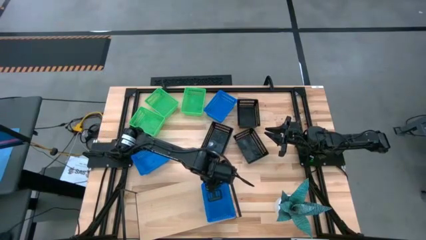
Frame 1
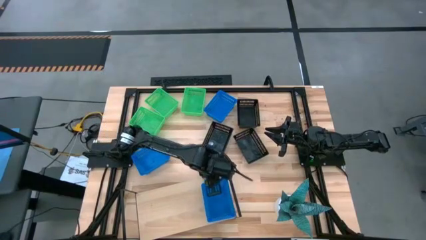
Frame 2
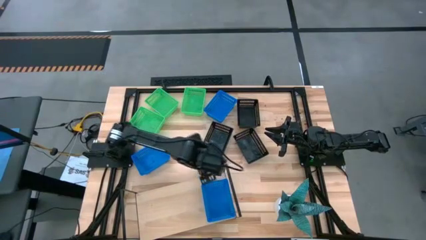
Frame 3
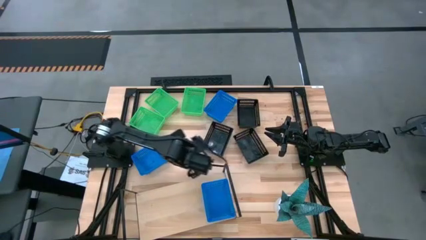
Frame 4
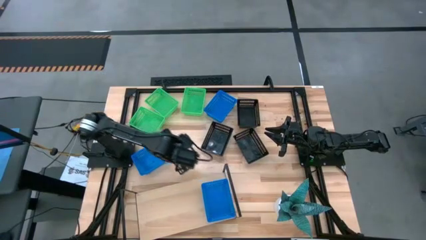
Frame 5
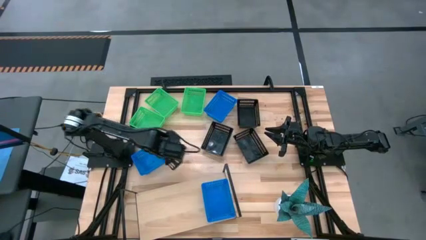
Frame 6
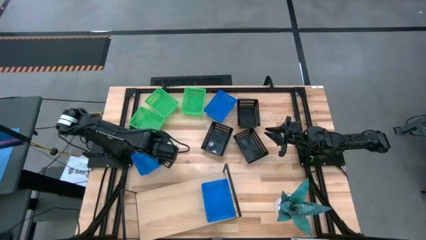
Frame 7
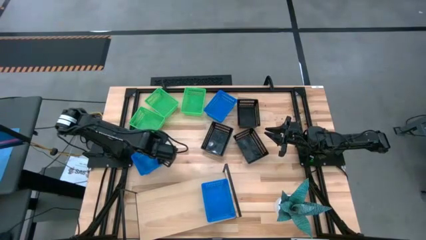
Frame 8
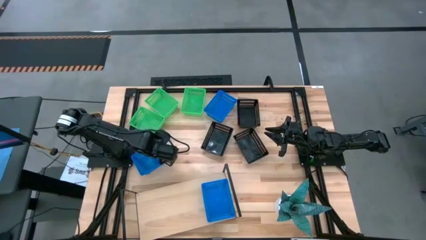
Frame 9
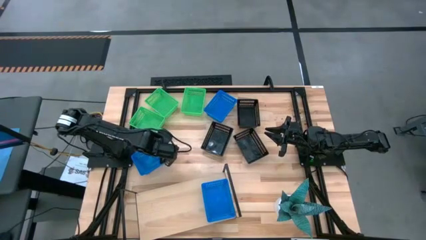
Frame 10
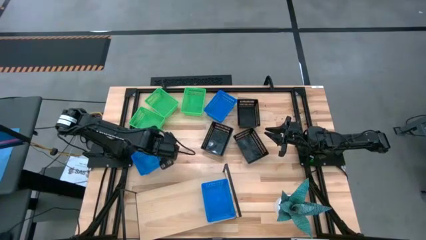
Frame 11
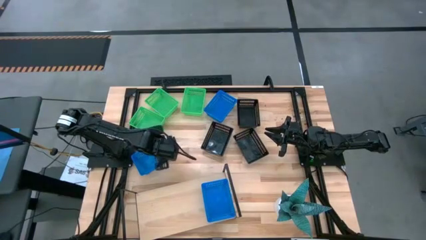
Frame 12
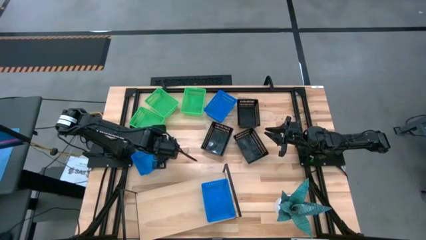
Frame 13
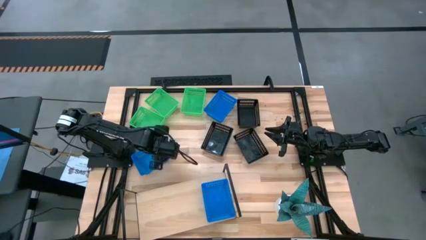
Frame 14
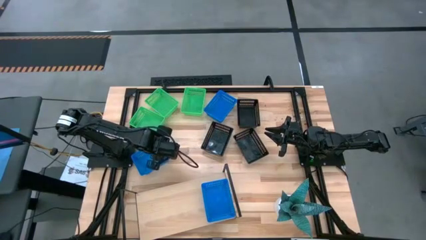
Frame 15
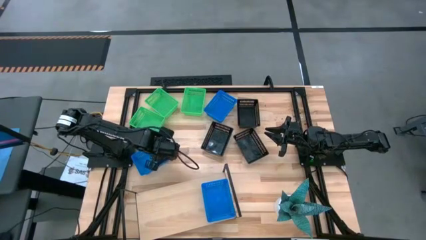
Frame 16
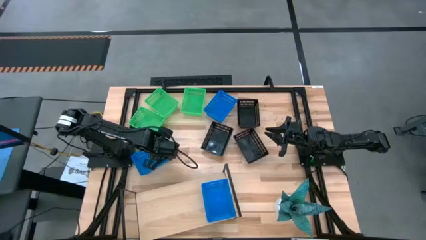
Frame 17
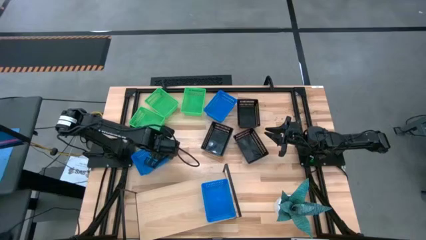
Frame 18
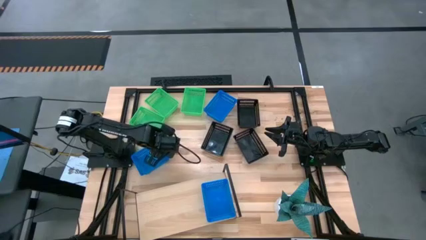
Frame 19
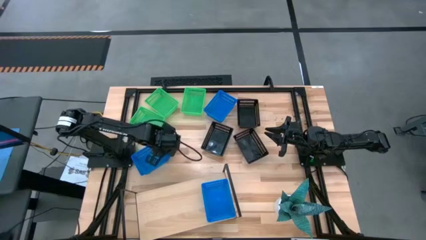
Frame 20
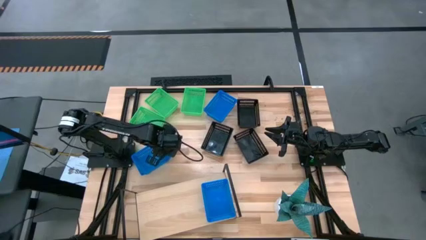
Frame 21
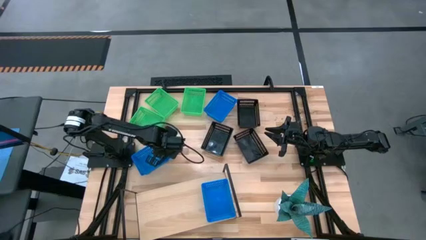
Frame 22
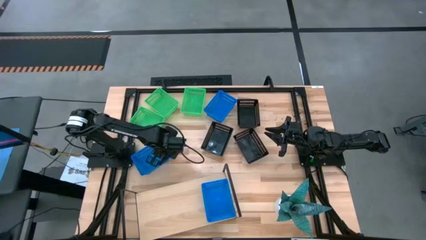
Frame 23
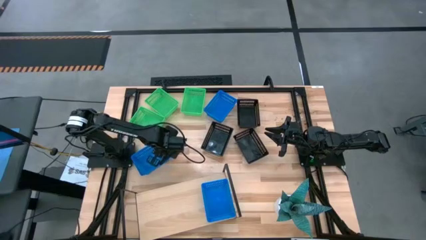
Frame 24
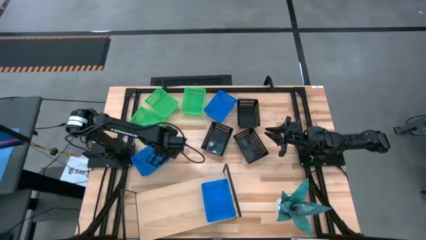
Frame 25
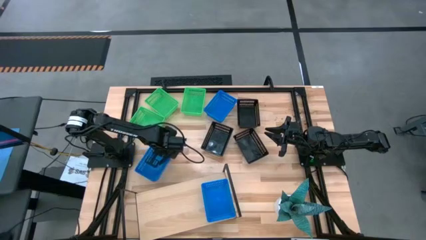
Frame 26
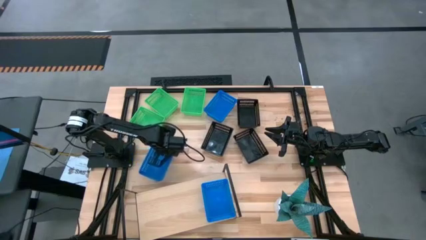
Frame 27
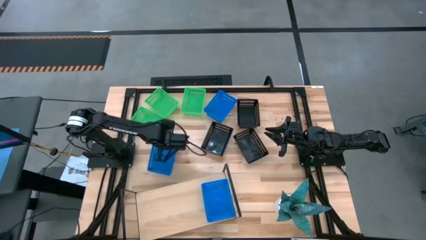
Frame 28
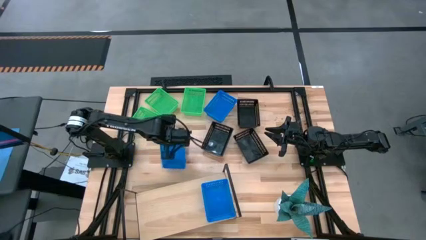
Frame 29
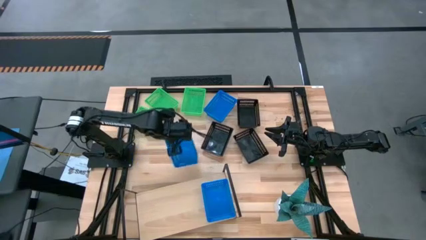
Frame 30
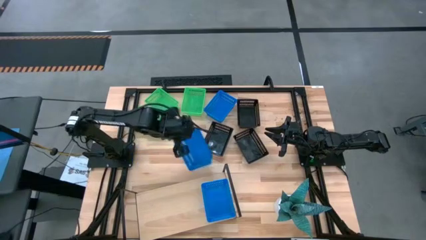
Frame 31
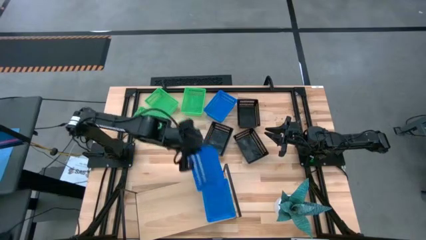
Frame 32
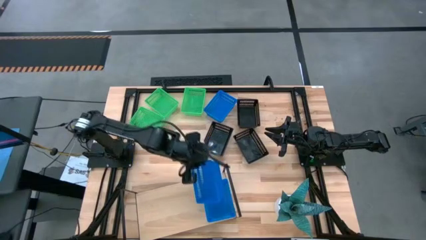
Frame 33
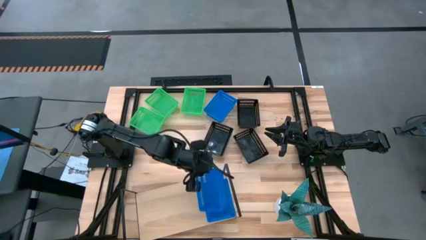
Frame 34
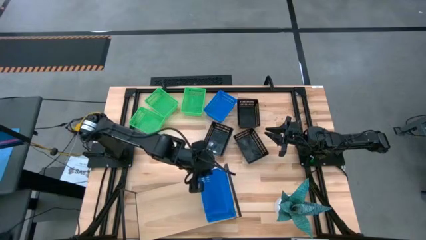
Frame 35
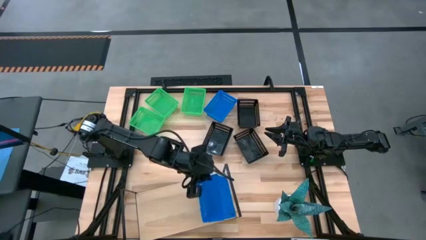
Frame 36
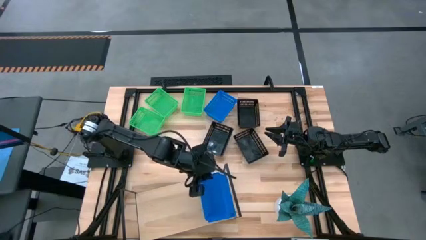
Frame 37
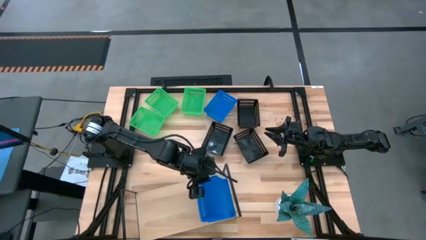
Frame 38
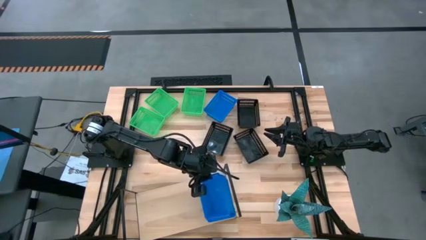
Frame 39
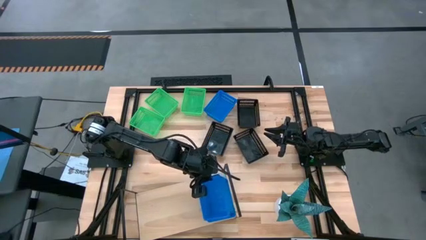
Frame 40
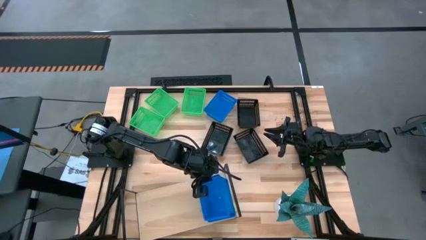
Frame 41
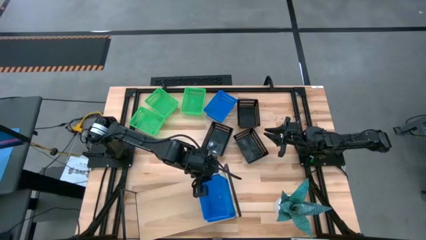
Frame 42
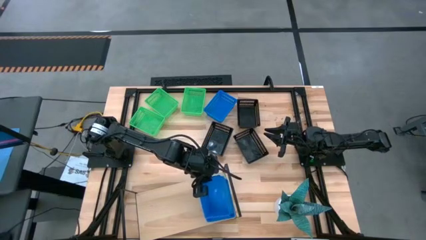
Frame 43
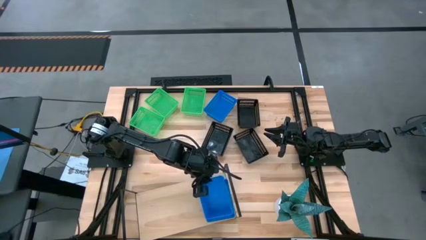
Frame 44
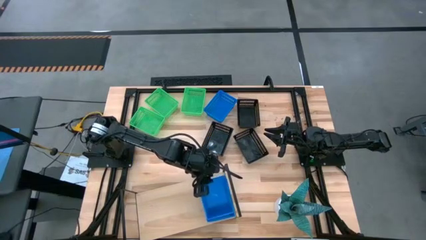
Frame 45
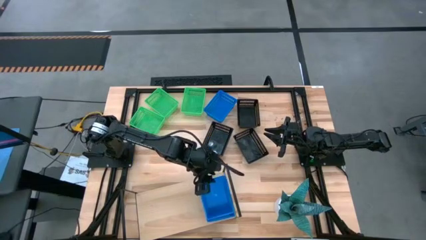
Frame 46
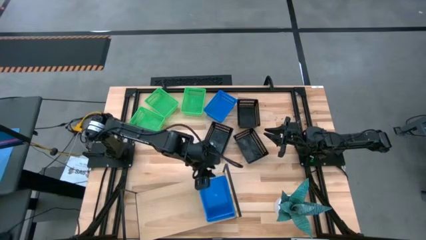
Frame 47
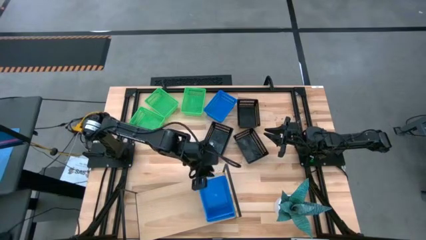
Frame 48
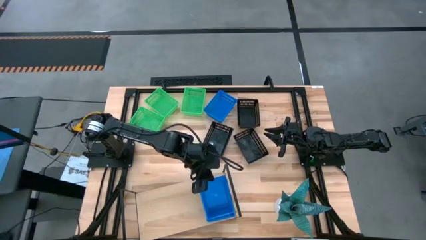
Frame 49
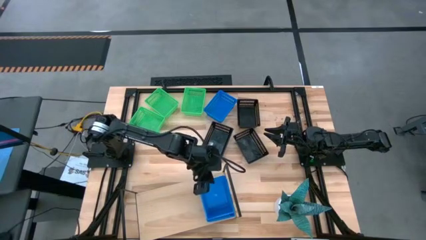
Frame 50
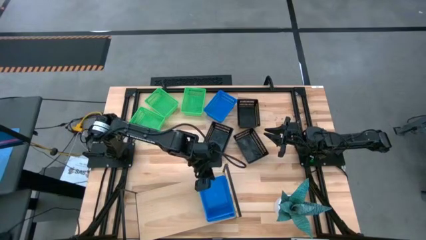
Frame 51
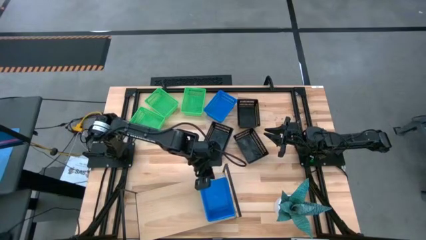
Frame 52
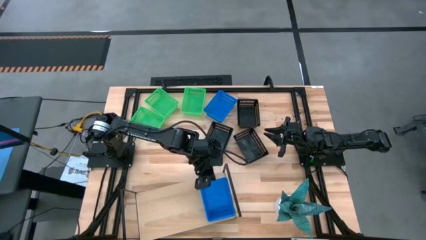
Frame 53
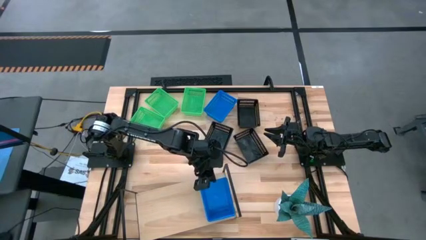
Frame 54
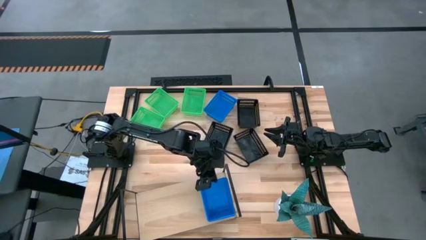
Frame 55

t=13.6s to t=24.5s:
Task: Stack baskets on shelf by color
Stack the bottom blue basket on top of the blue basket

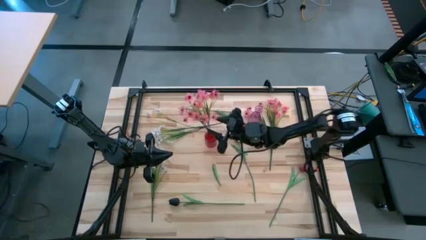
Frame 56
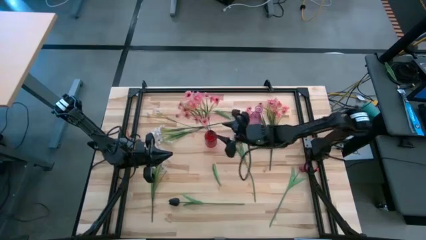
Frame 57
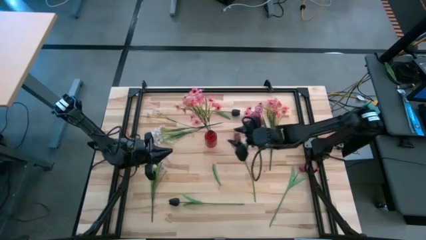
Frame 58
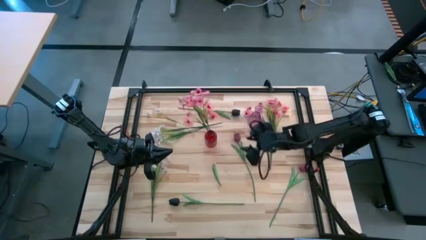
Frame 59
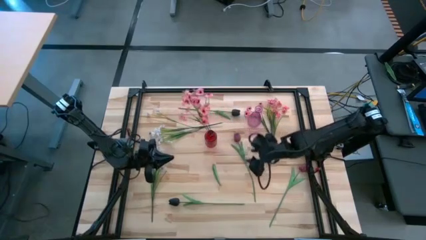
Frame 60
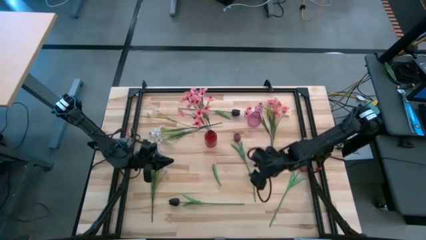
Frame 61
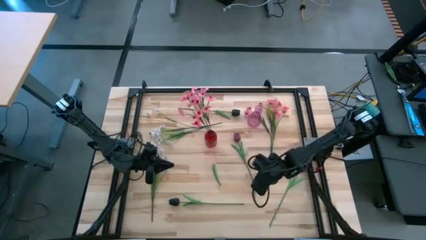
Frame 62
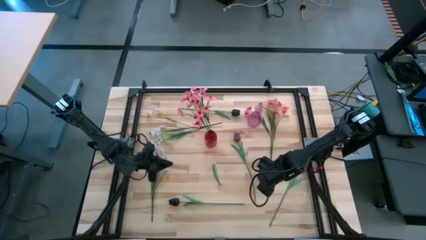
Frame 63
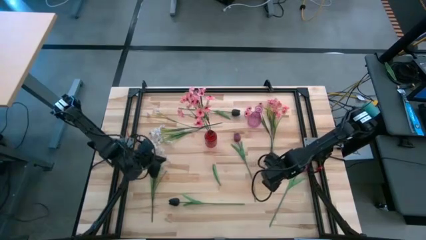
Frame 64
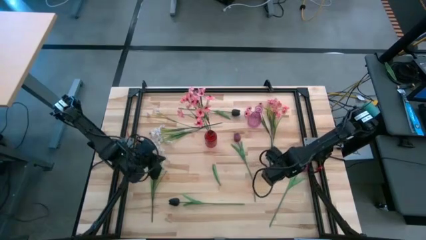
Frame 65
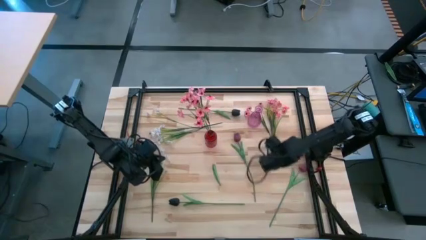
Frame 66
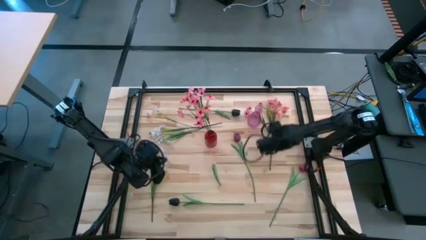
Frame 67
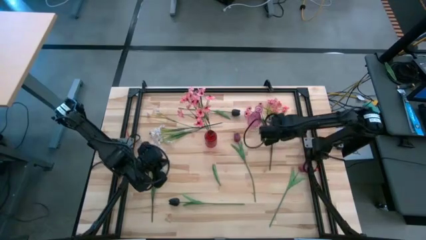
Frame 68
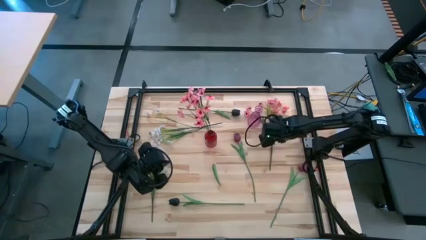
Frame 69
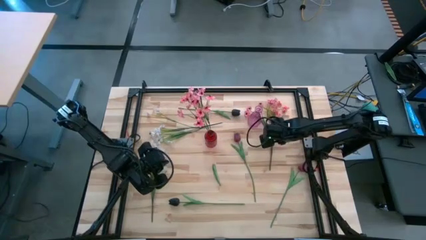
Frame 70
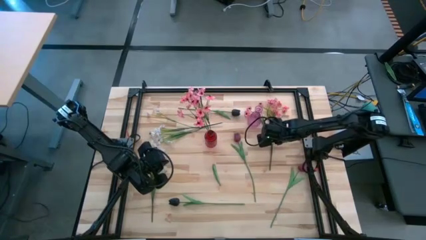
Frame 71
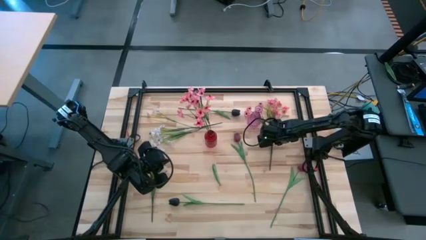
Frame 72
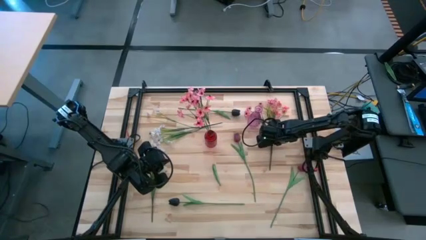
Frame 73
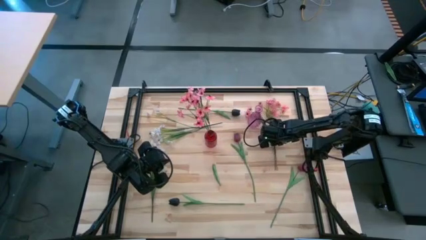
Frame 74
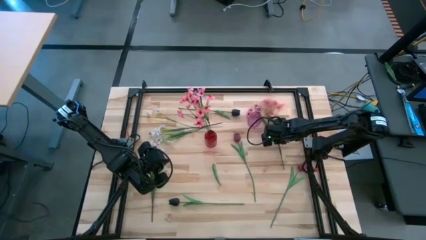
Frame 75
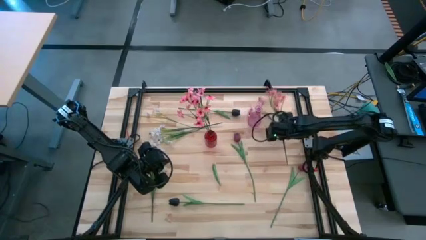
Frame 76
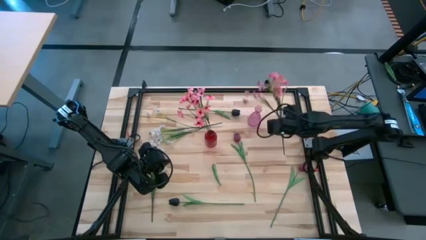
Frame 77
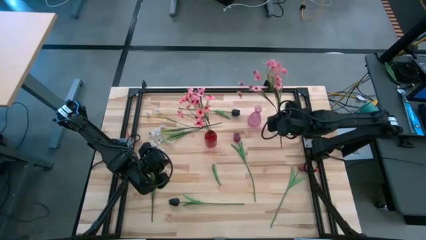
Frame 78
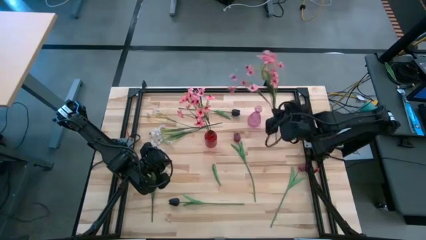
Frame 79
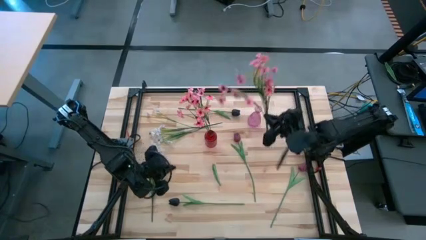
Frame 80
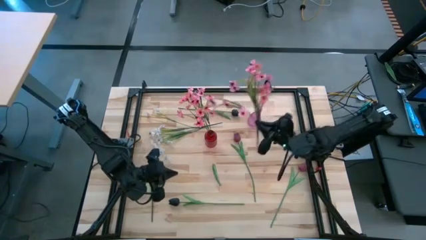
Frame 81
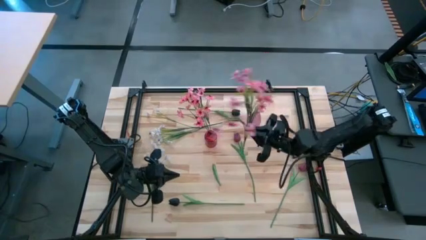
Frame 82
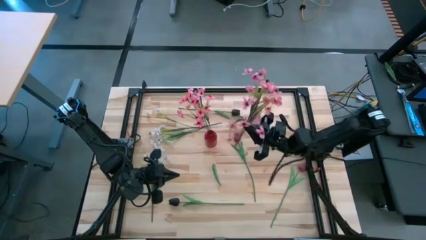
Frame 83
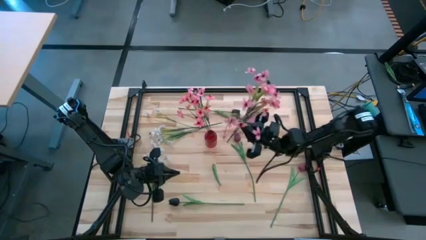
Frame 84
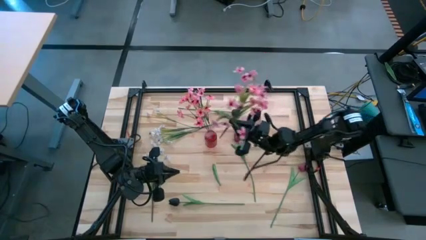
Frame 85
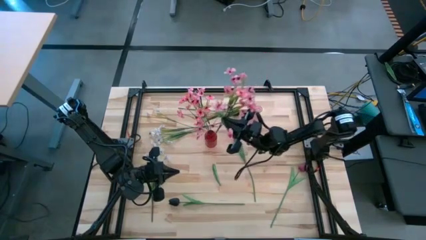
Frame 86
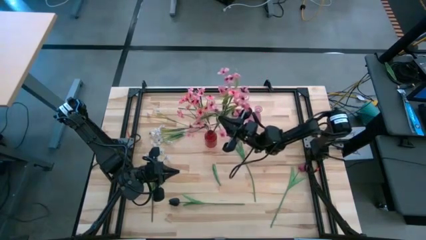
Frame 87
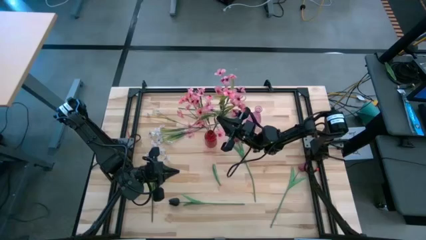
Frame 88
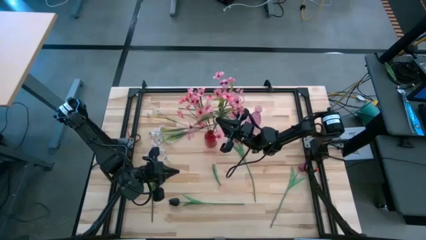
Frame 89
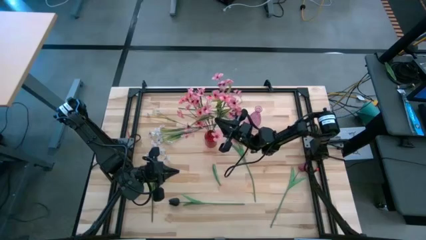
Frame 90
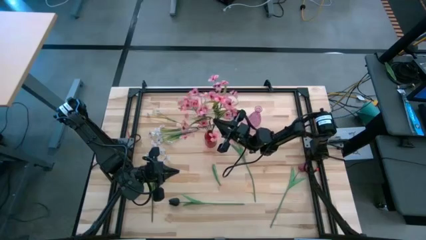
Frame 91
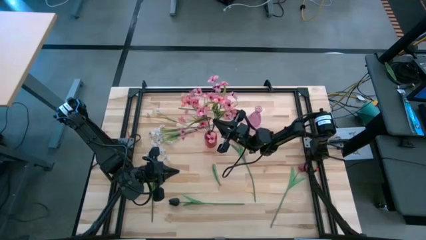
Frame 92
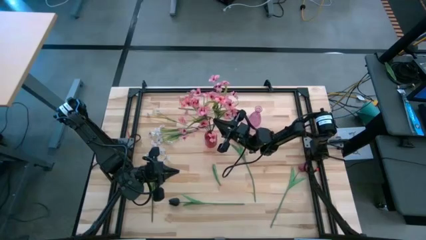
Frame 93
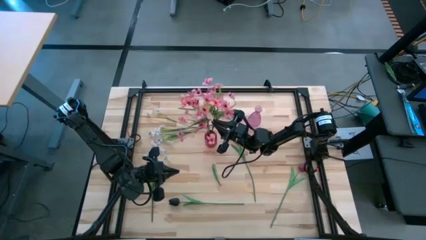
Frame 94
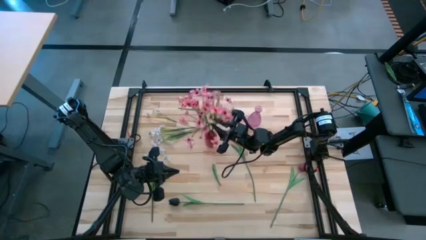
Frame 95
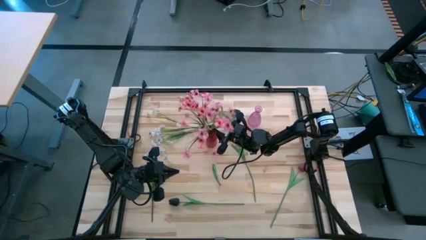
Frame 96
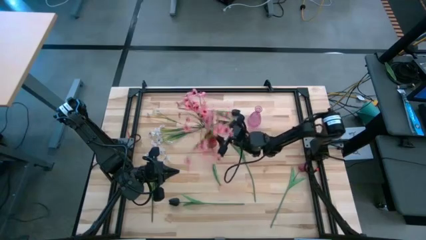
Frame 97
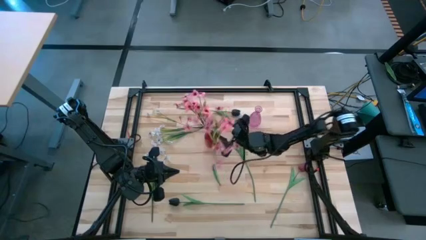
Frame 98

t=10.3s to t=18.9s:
Task: Sort flowers into vase by color
Put the pink flowers into the red vase
